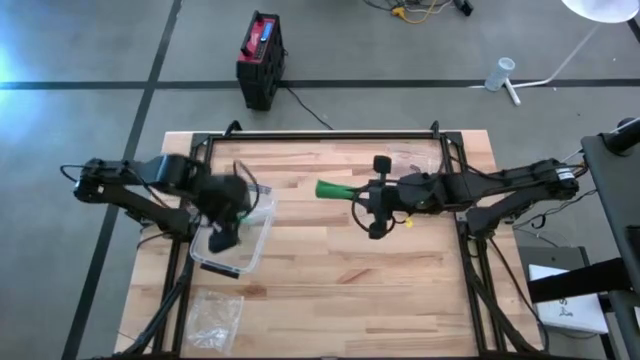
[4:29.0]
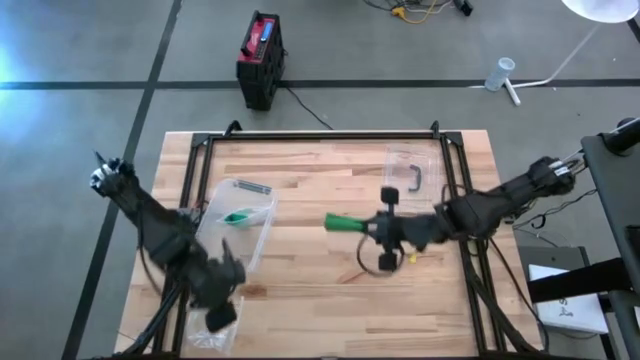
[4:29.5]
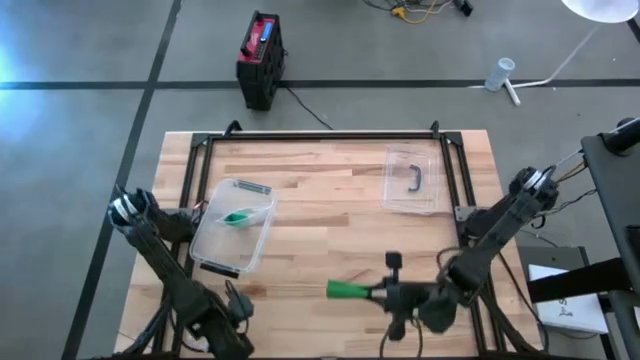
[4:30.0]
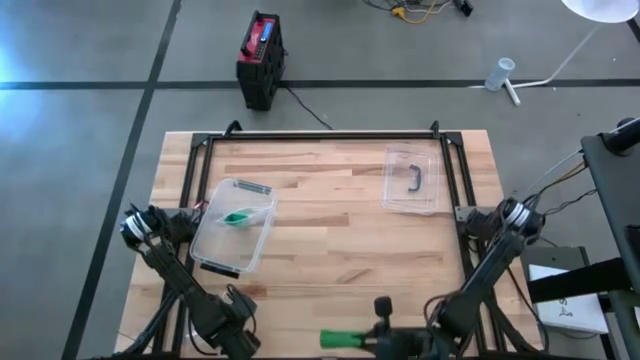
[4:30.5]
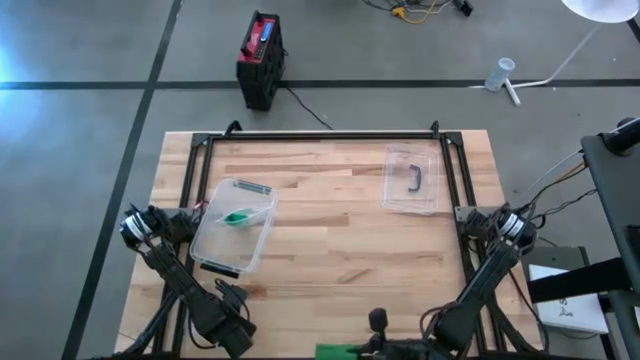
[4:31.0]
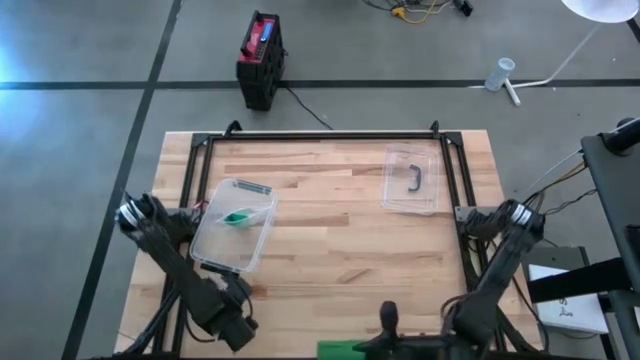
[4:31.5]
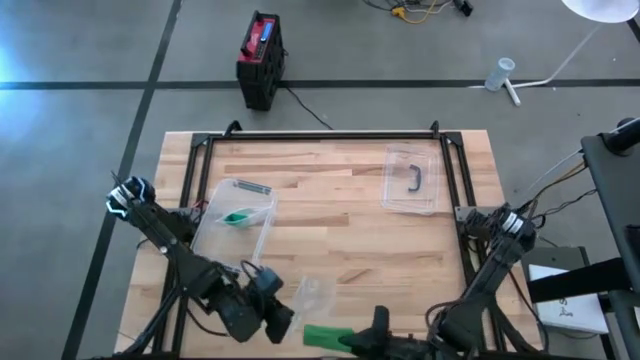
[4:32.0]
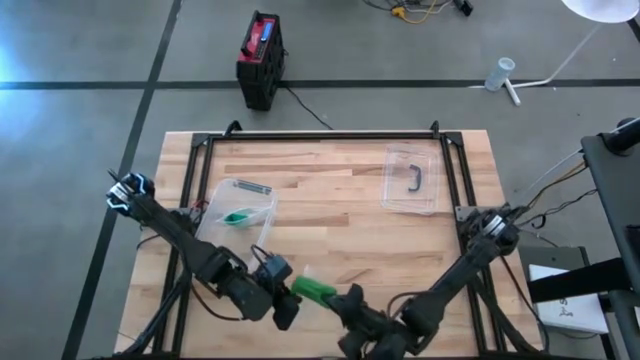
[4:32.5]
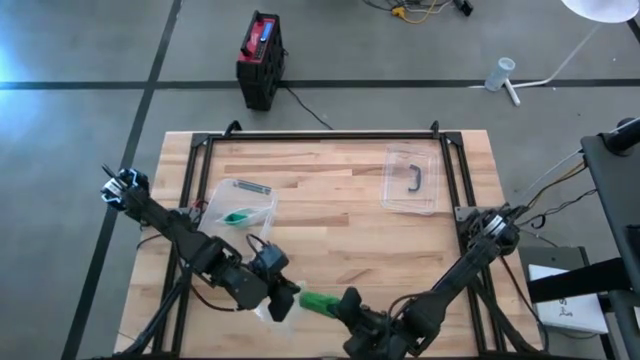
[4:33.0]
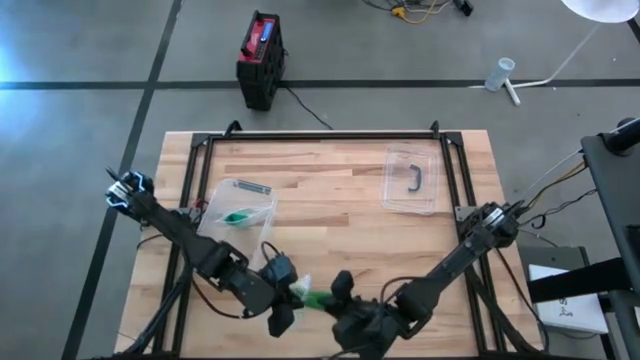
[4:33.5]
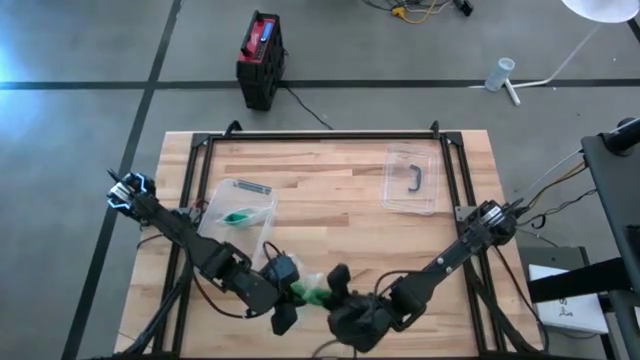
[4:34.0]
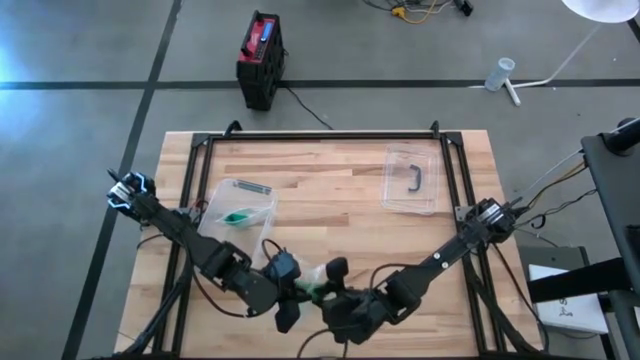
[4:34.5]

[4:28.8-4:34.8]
Task: Roll bandage
Put the rolled dark green bandage into the transparent zip bag

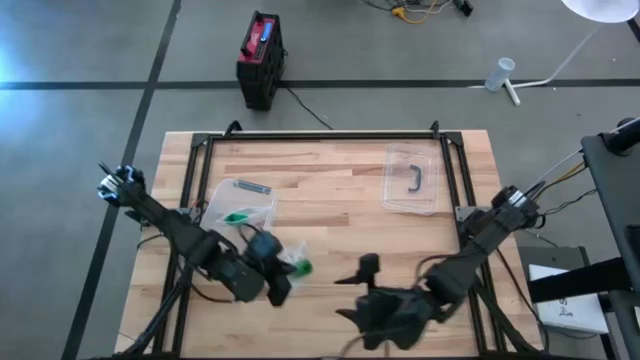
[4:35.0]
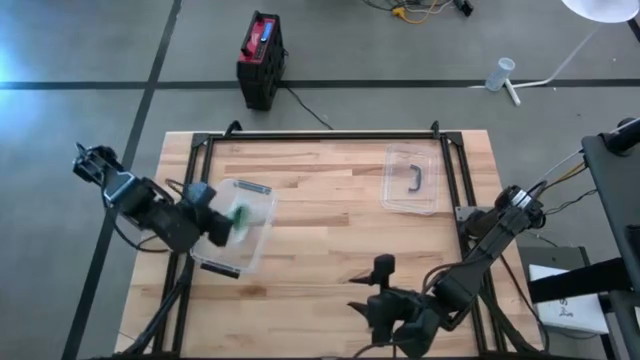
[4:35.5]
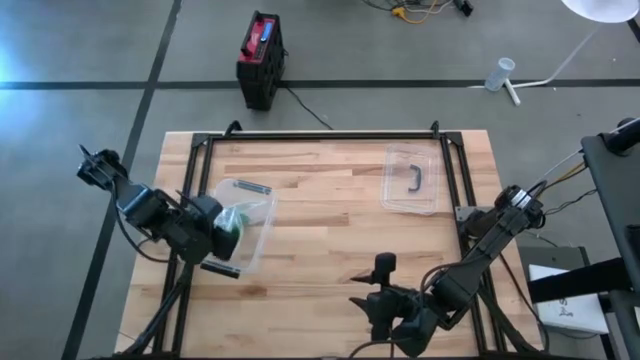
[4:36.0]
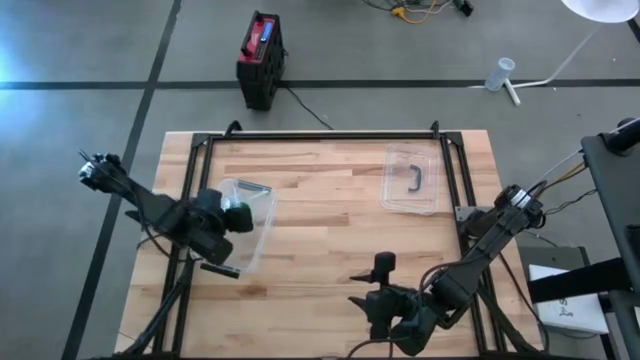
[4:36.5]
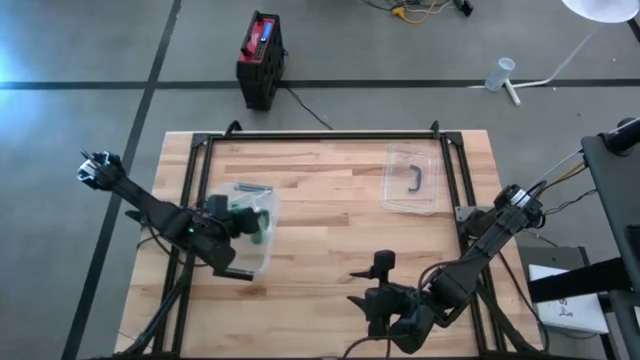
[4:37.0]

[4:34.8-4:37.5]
Put the zip bag with the rolled dark green bandage into the transparent bin

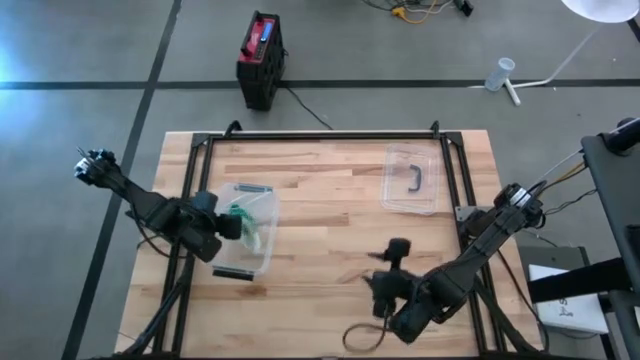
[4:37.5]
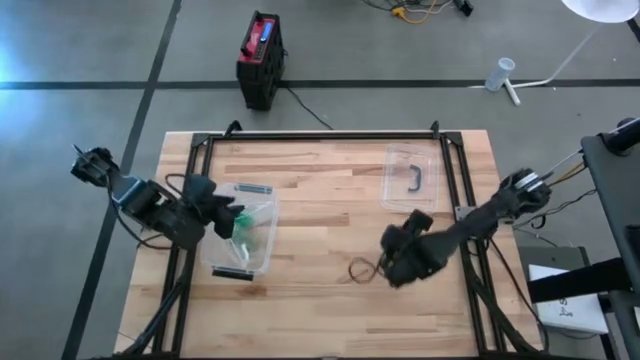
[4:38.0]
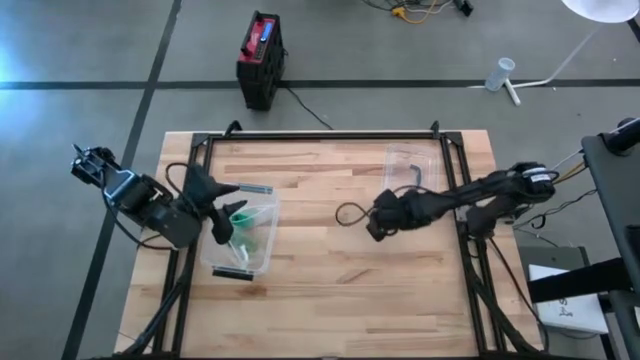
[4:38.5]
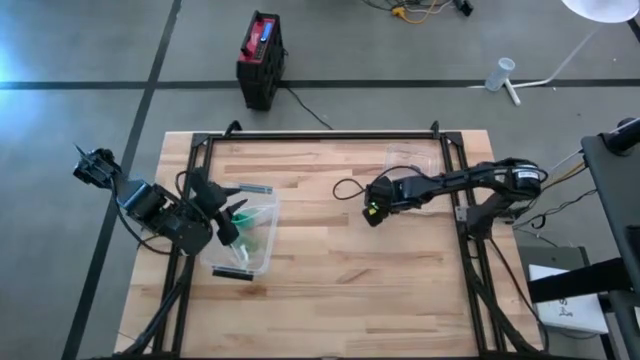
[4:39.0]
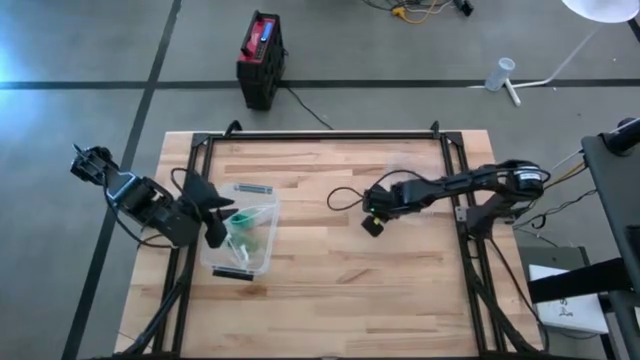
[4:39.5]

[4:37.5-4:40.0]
Close the transparent bin

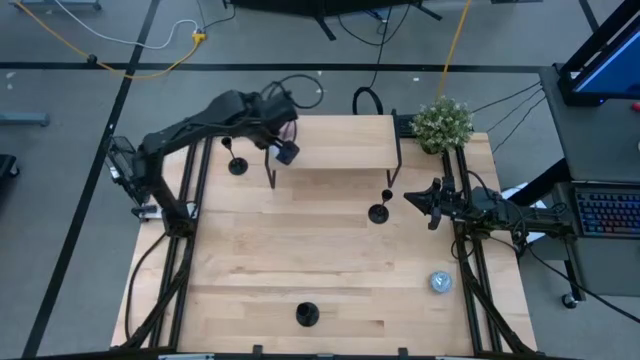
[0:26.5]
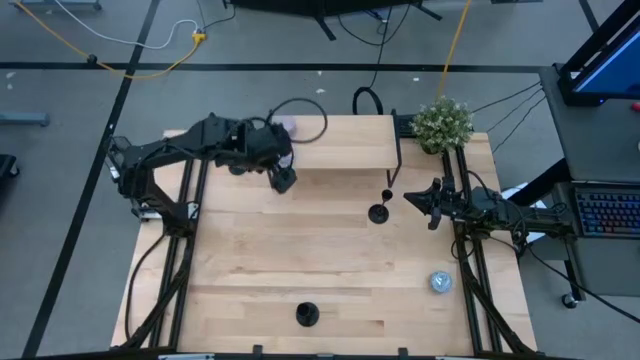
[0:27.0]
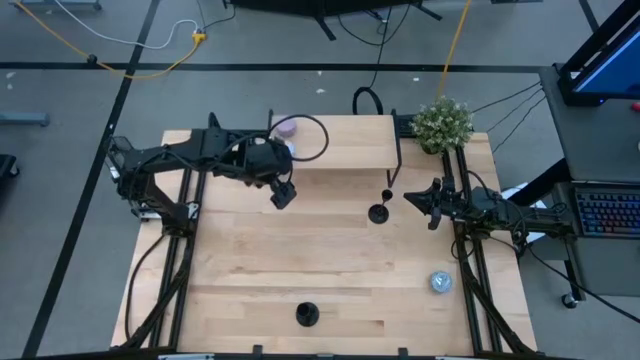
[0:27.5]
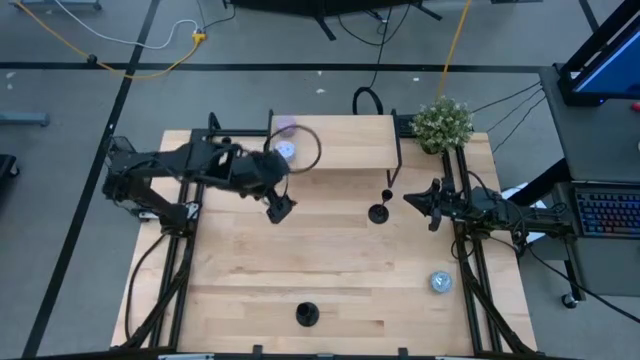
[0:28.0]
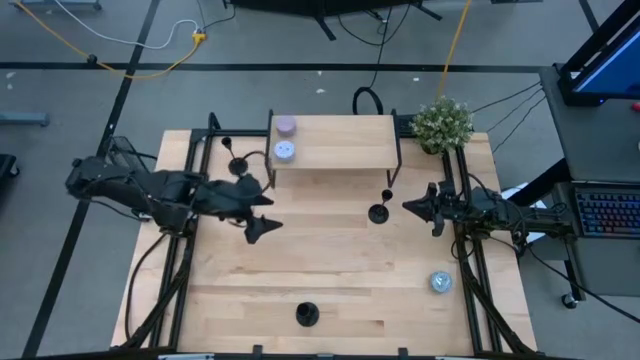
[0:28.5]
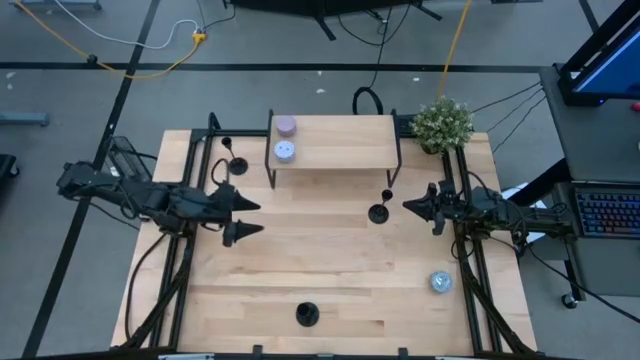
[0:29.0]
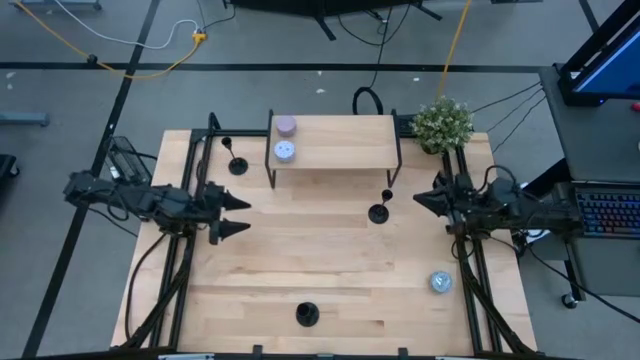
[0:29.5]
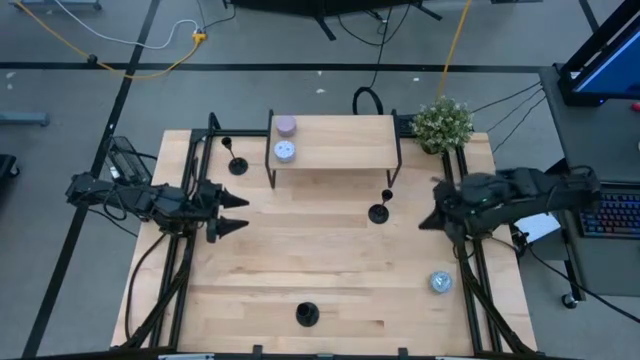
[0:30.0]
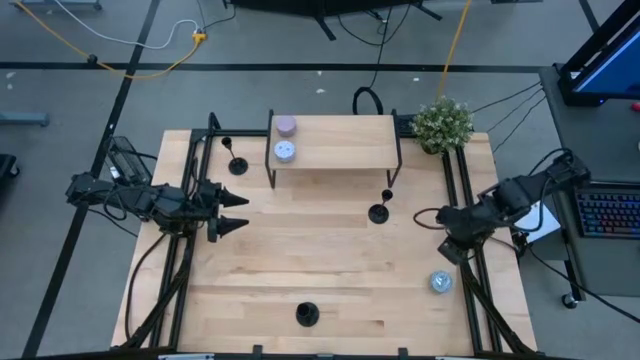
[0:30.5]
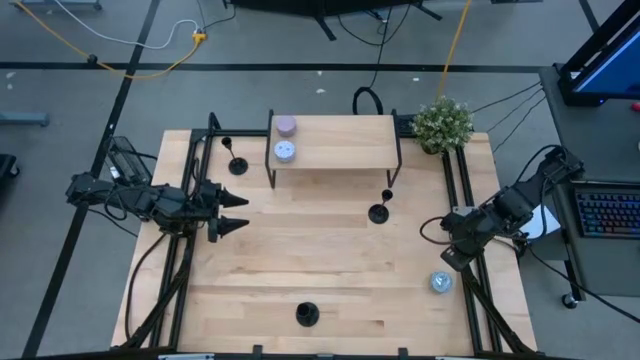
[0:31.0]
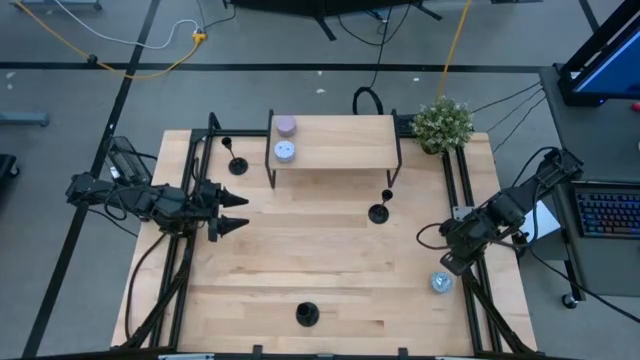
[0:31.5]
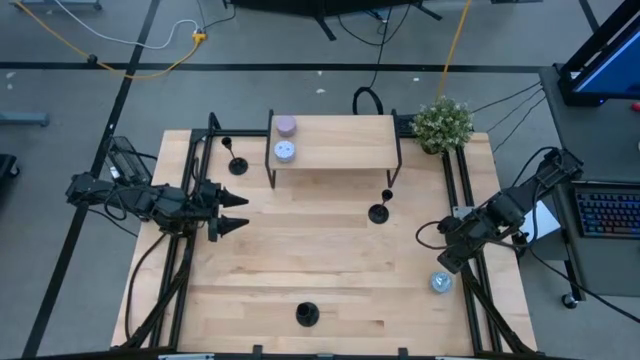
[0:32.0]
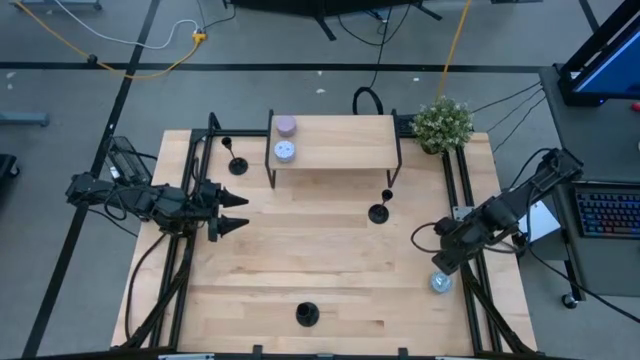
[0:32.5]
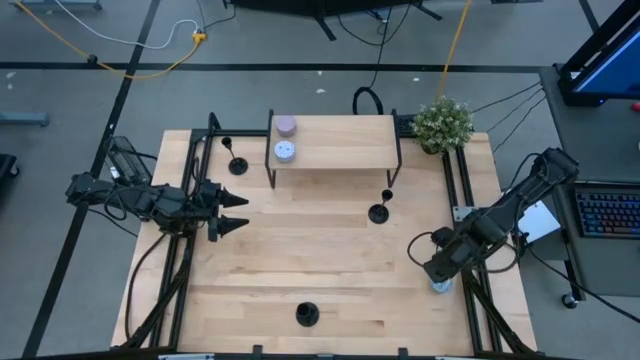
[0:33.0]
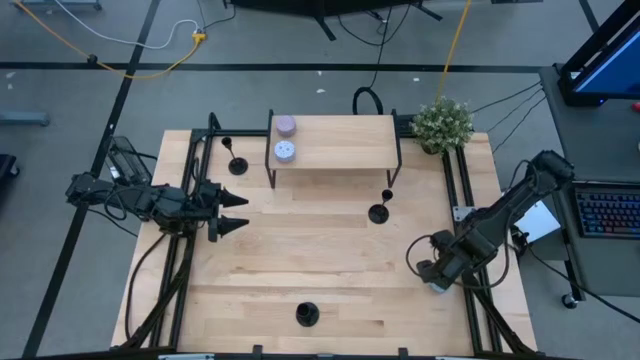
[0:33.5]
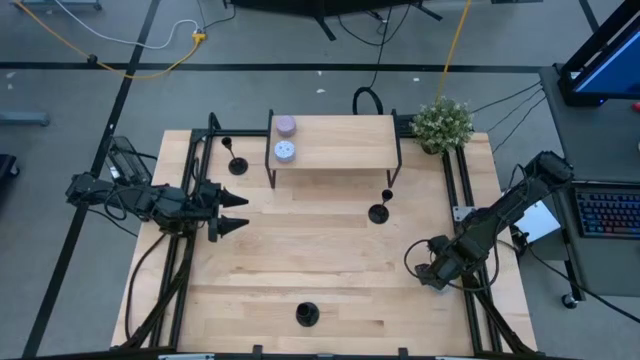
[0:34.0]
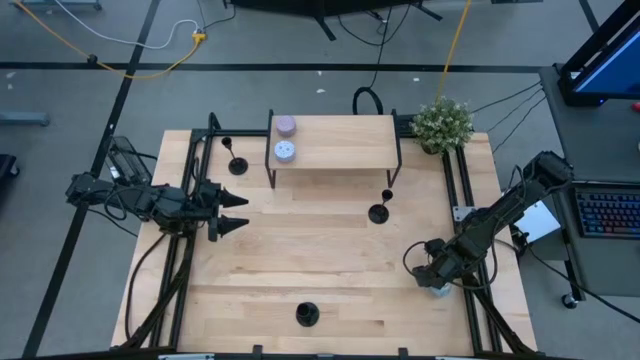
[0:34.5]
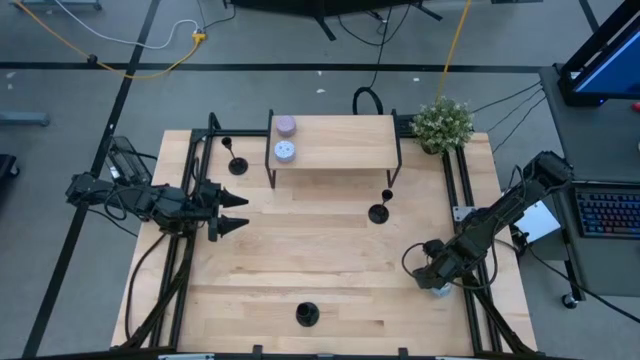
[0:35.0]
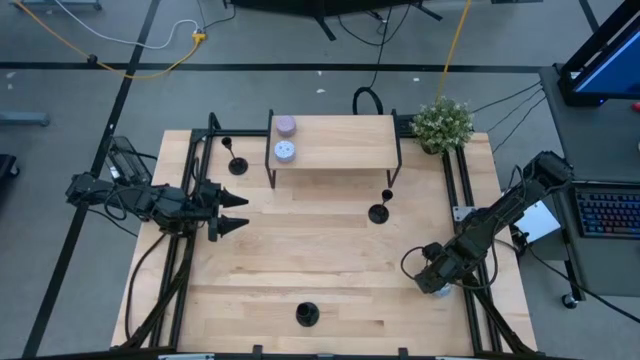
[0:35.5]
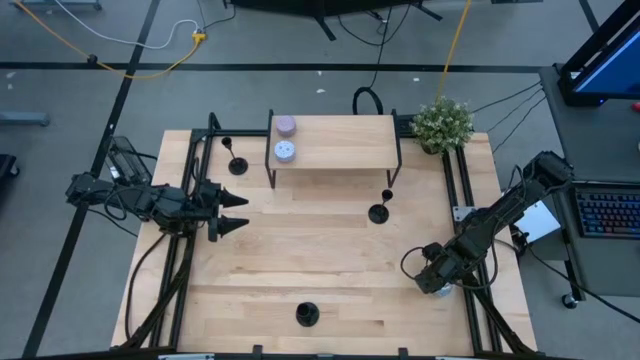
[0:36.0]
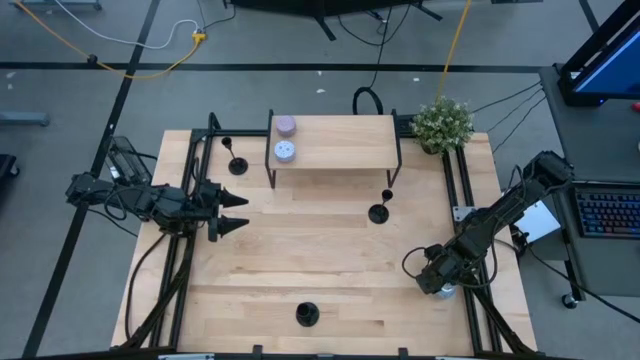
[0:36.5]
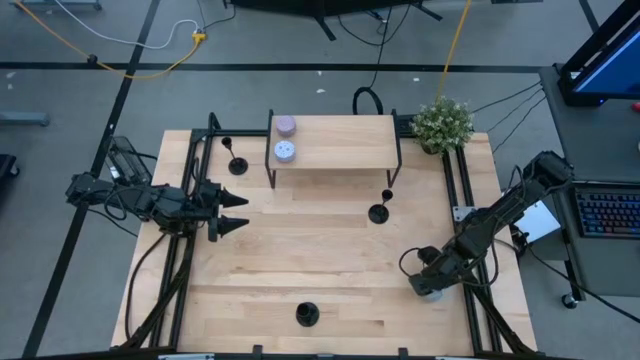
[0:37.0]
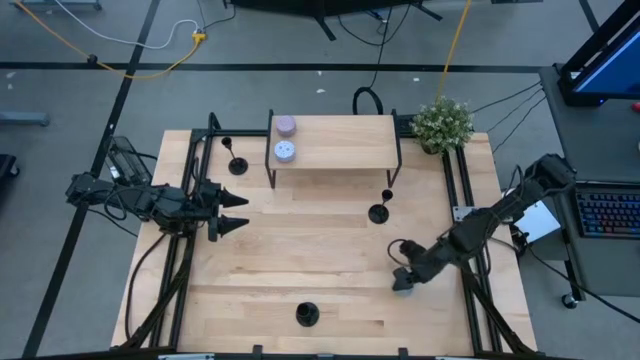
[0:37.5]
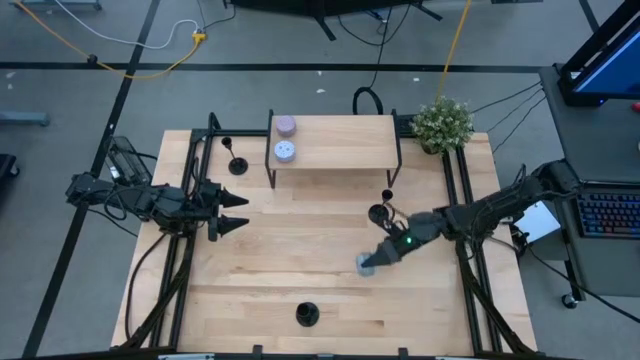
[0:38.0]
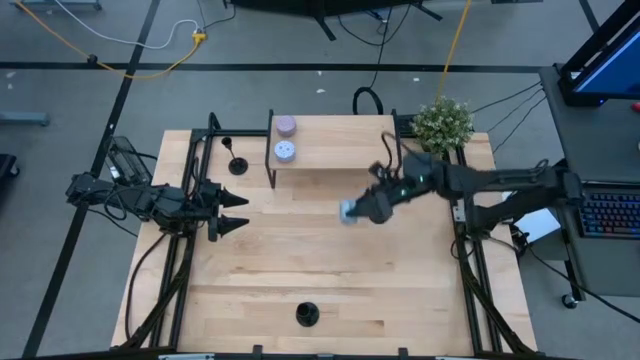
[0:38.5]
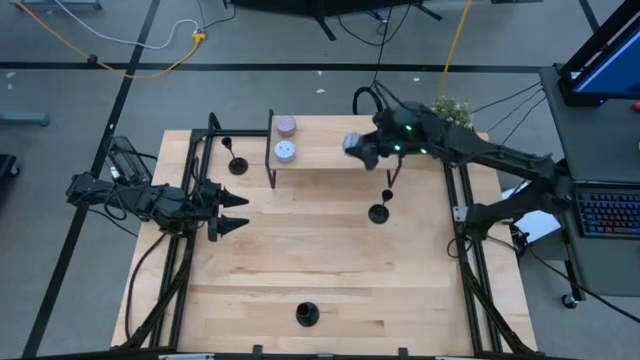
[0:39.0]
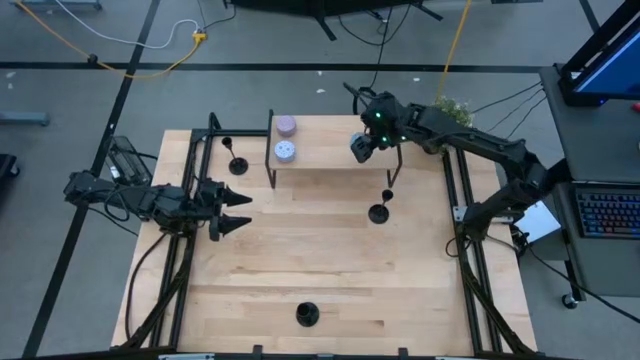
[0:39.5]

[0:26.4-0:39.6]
Task: Pick & Place candle stick holders
Put the blue patterned scented candle on the shelf
